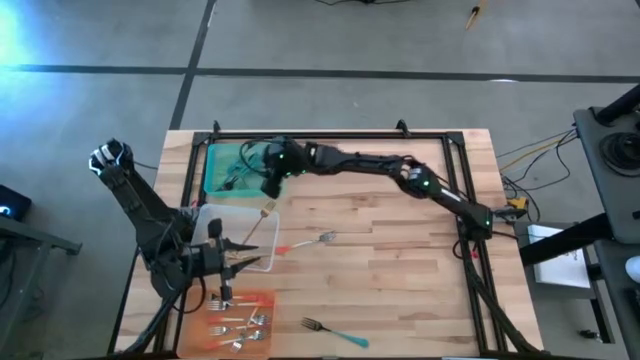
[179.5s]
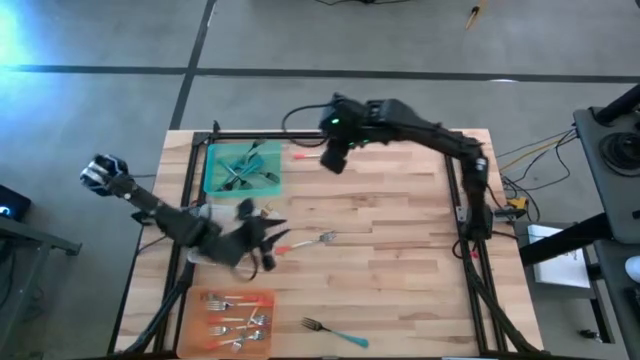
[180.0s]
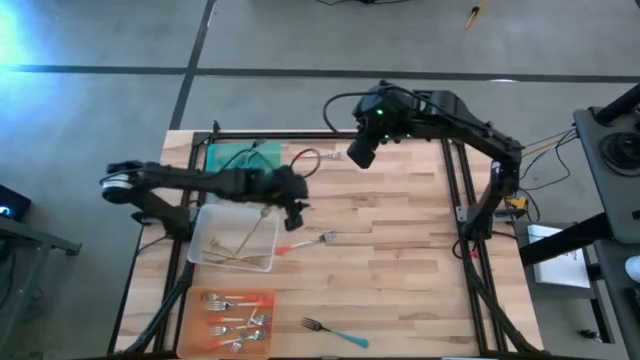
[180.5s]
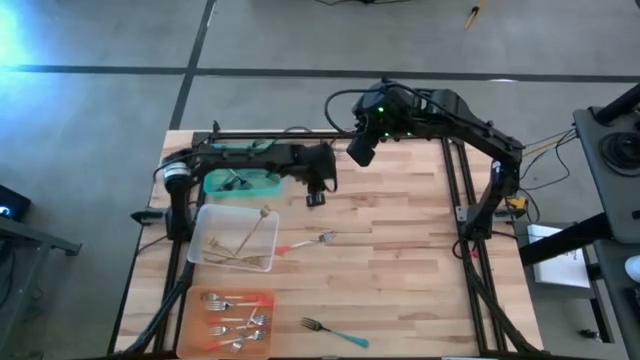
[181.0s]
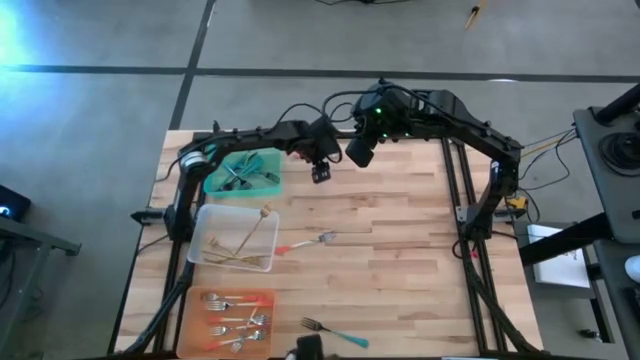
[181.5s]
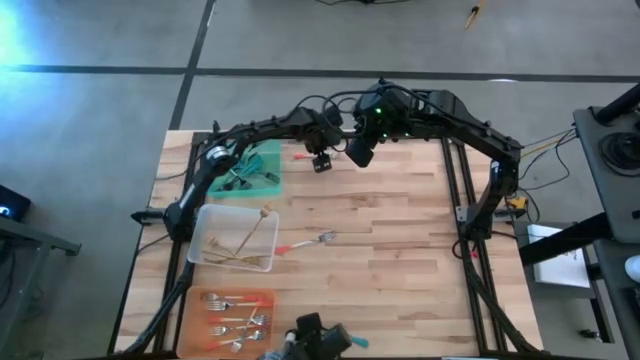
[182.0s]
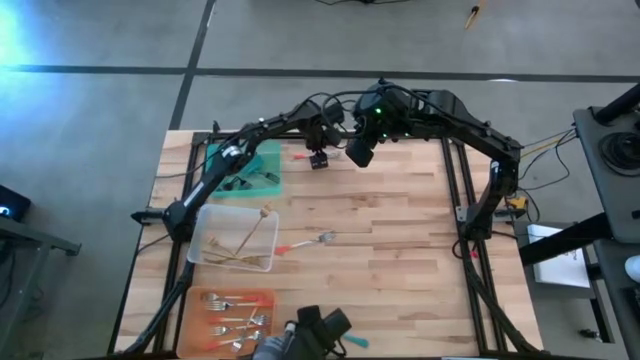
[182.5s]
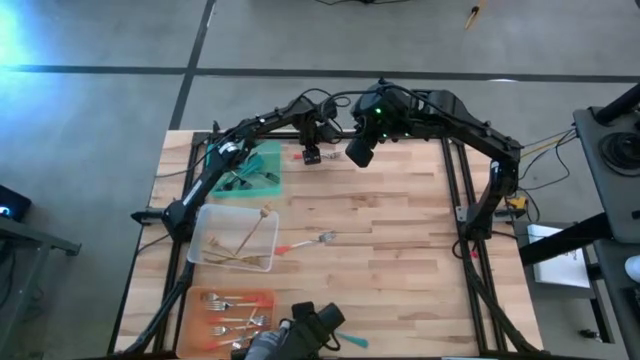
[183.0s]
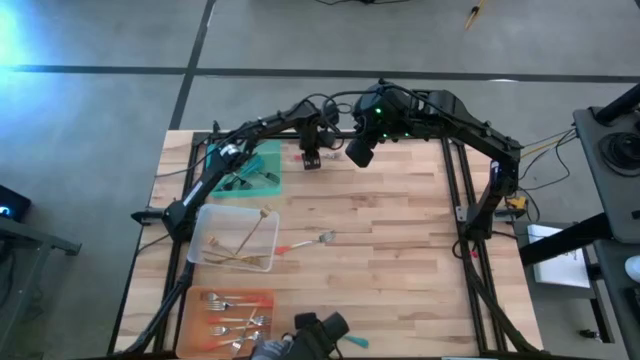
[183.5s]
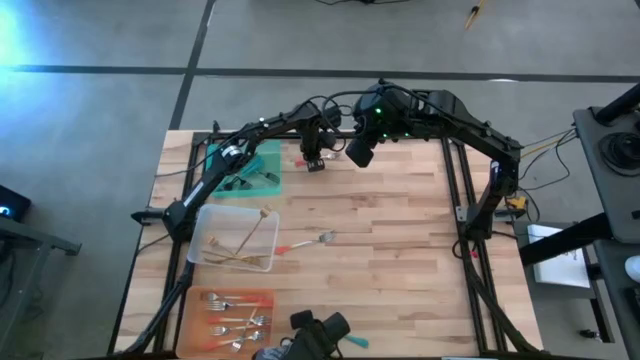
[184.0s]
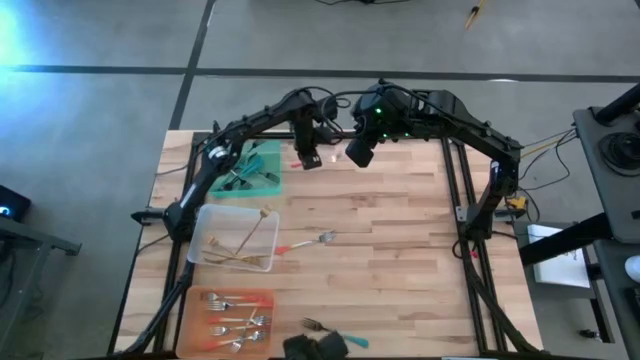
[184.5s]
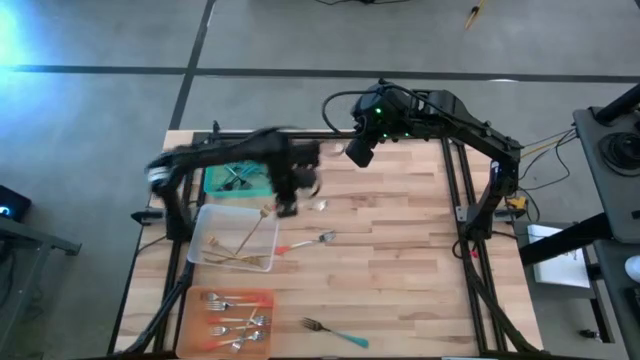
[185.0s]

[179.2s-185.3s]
Task: Sort silverware by color (type)
Put the orange fork into the orange bin

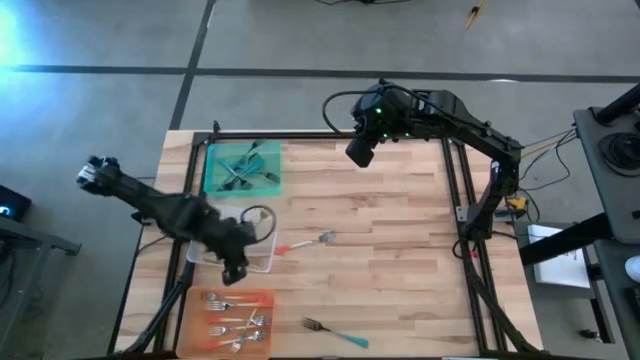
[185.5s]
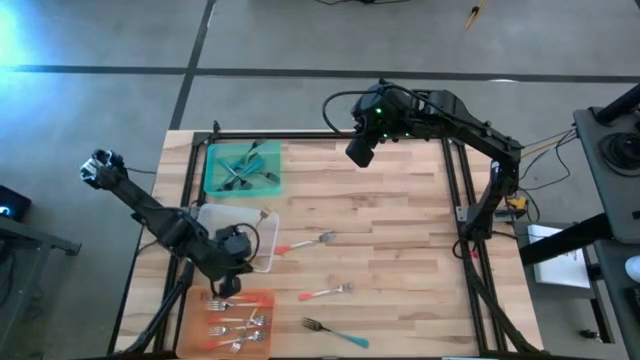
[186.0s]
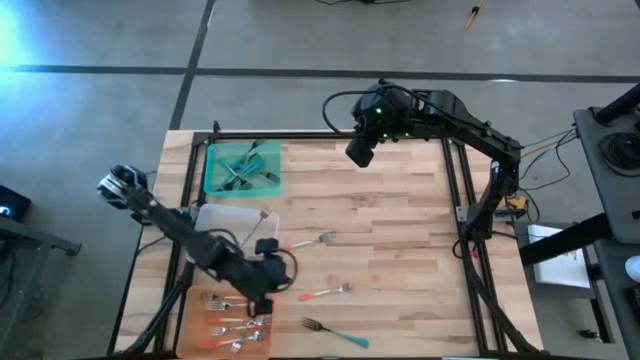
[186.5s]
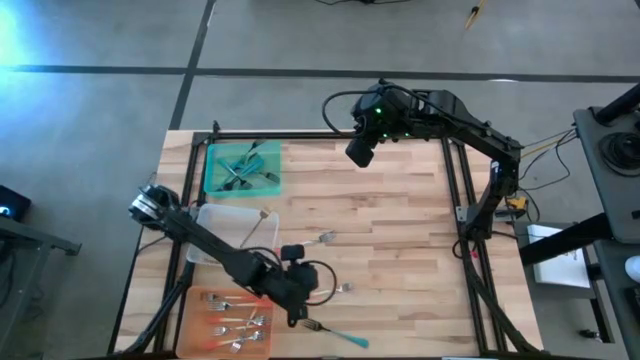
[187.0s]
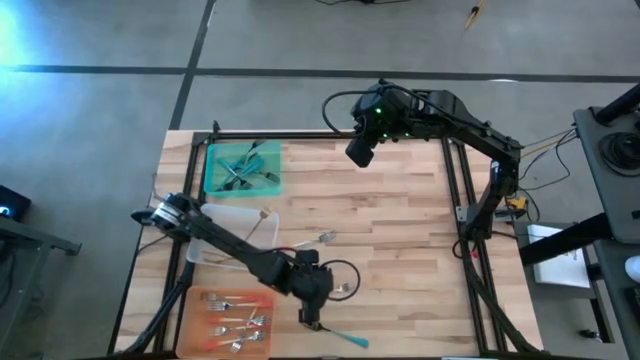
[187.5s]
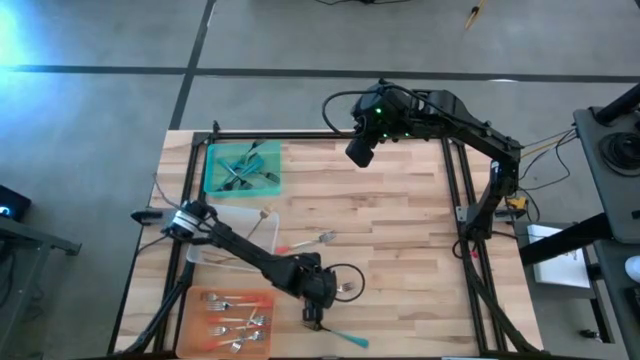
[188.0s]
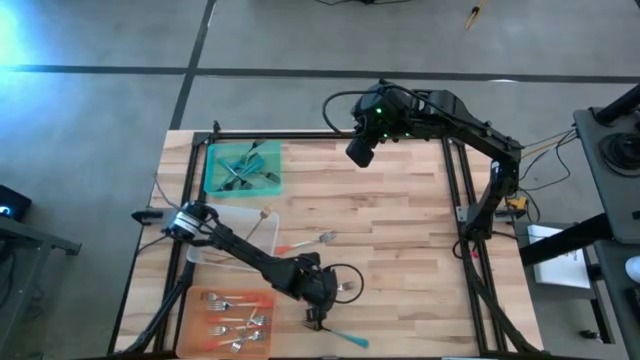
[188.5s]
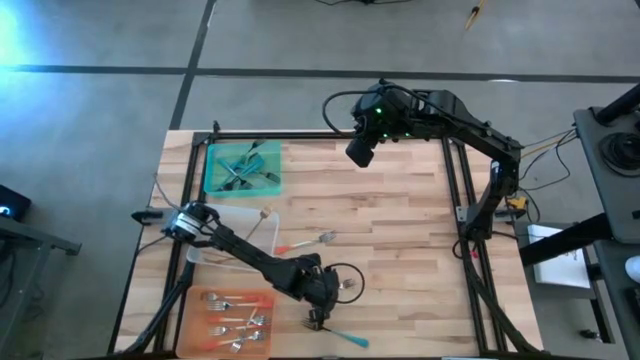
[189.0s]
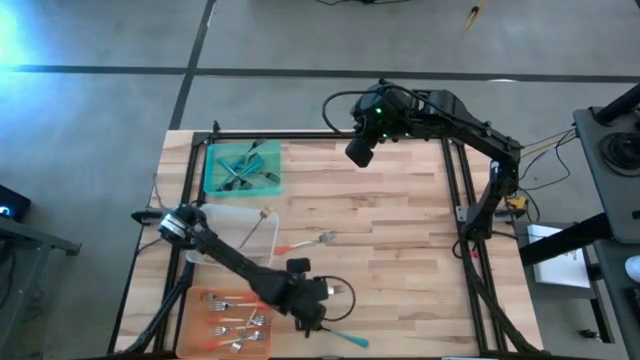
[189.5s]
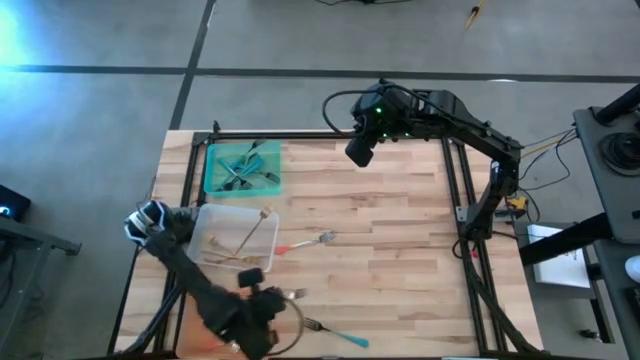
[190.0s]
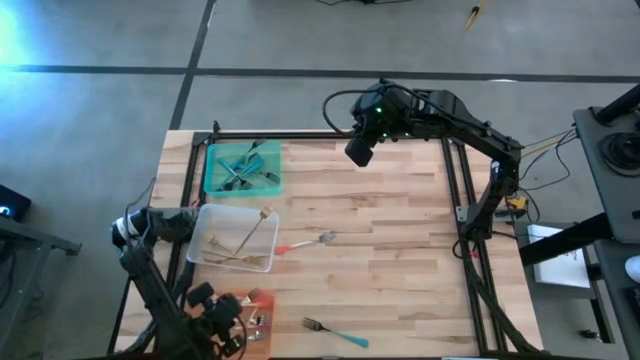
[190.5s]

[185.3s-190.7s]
Put the orange fork into the orange bin

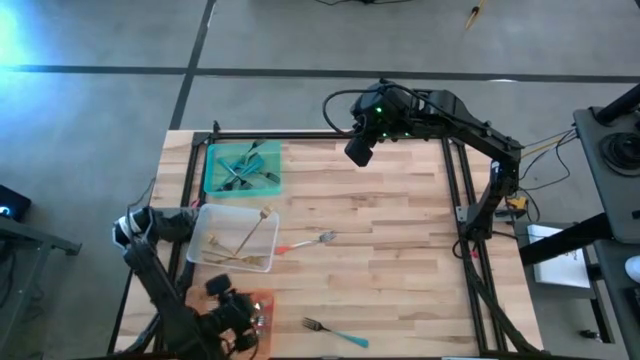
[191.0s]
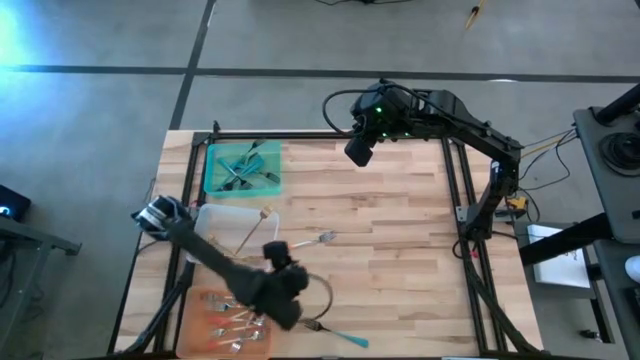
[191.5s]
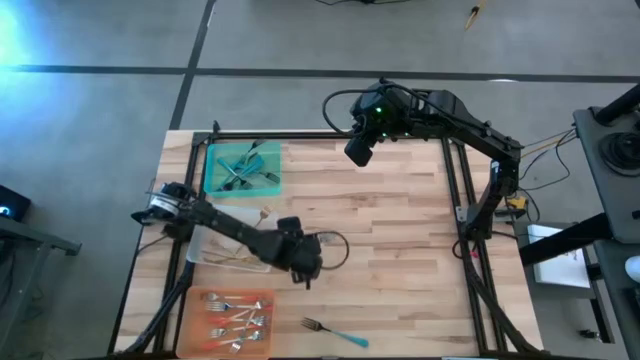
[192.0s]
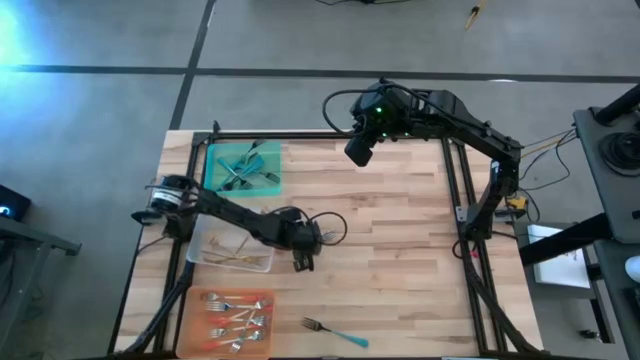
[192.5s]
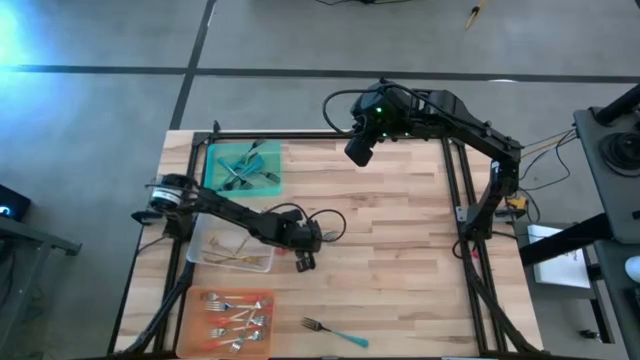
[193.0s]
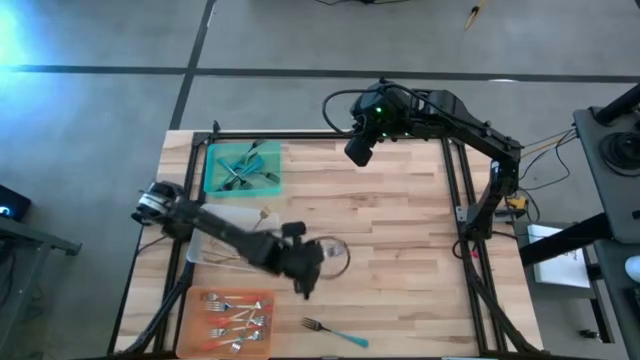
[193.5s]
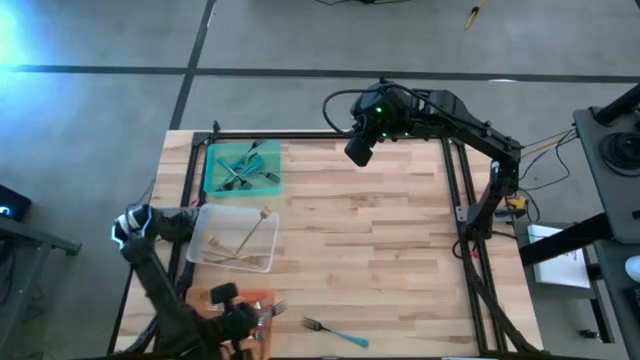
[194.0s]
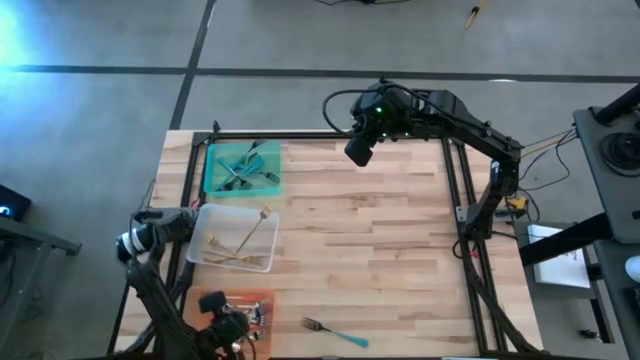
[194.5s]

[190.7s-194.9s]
Put the orange fork into the orange bin

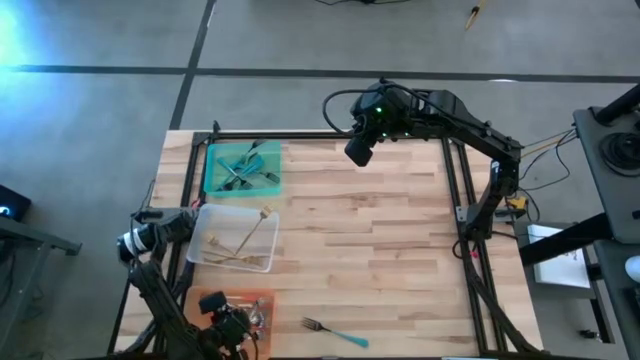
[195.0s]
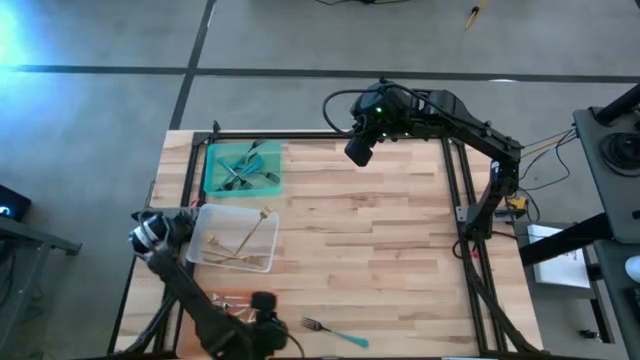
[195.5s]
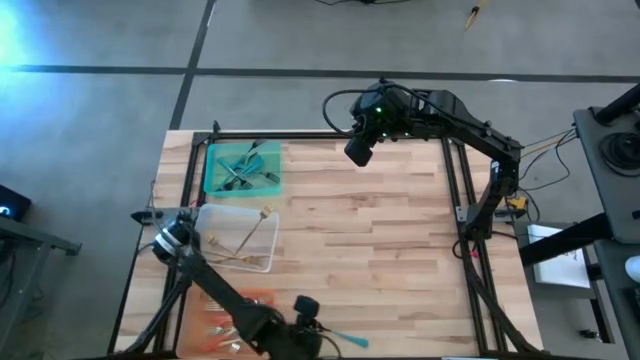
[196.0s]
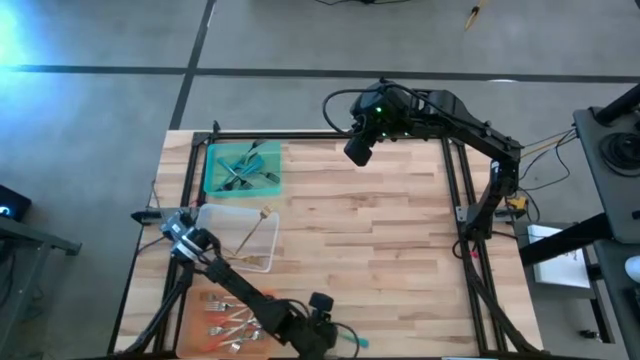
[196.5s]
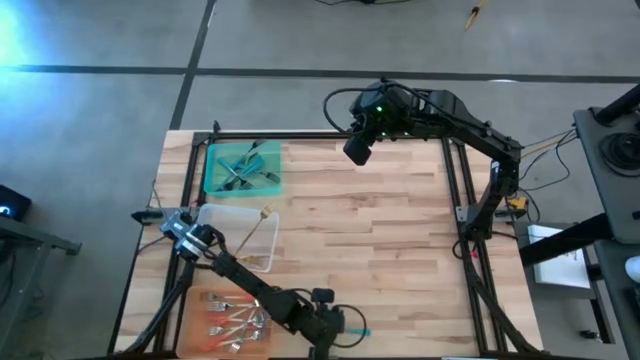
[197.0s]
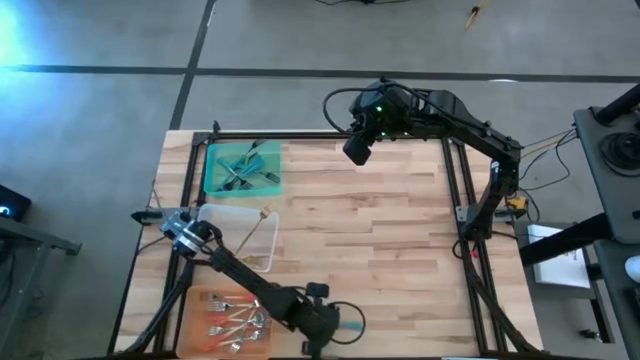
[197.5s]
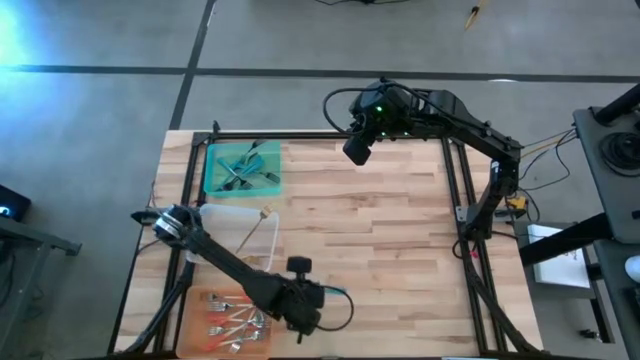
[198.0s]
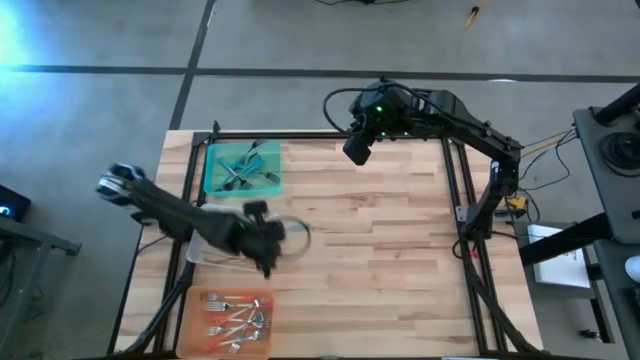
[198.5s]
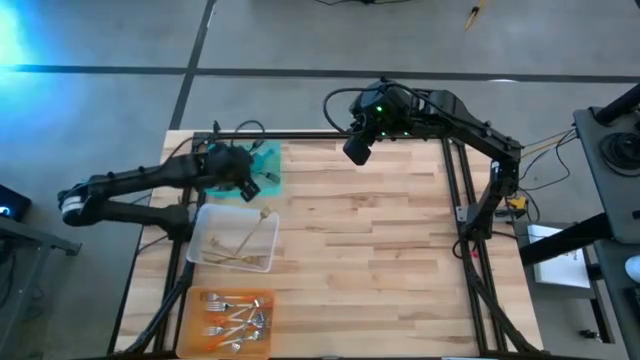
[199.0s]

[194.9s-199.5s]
Put the blue fork into the blue bin

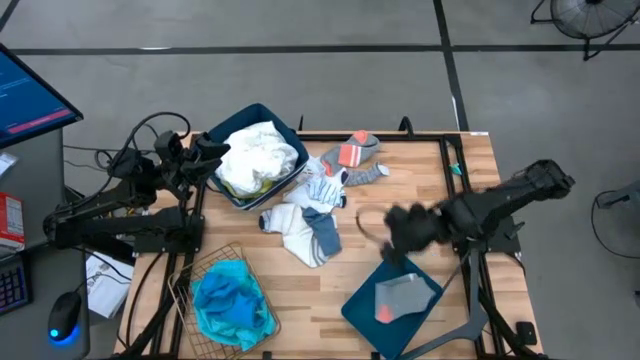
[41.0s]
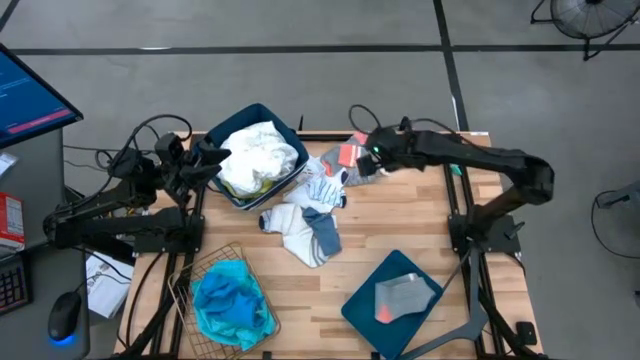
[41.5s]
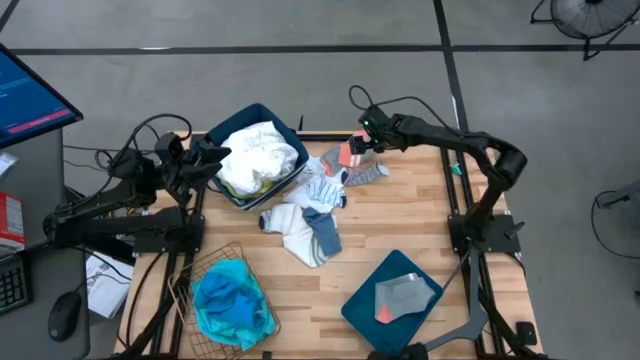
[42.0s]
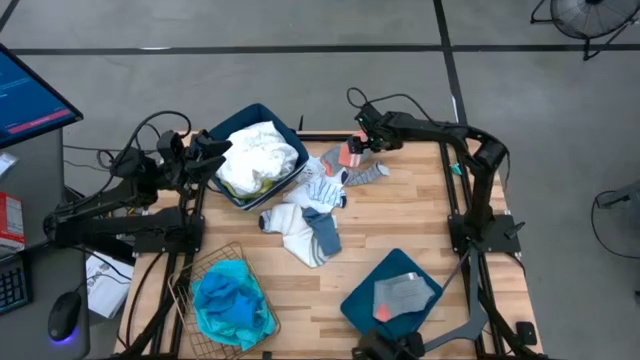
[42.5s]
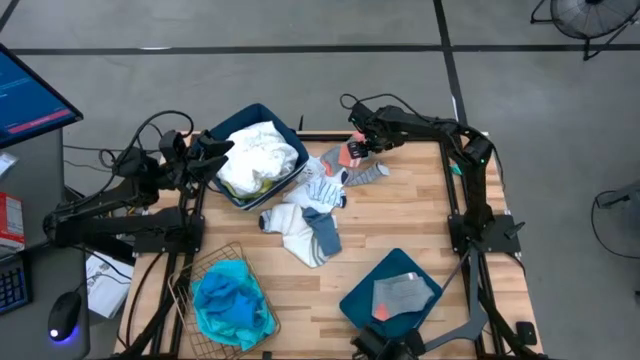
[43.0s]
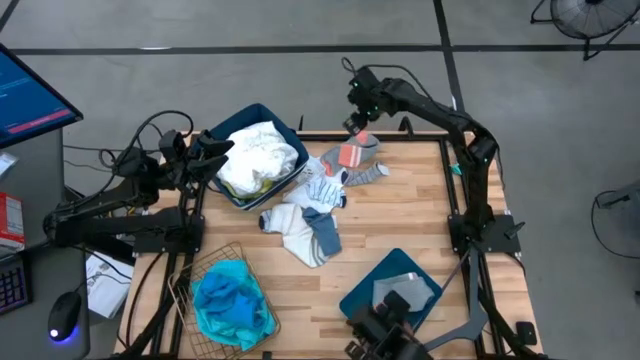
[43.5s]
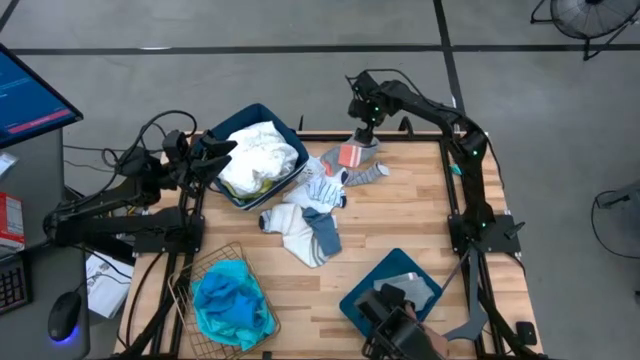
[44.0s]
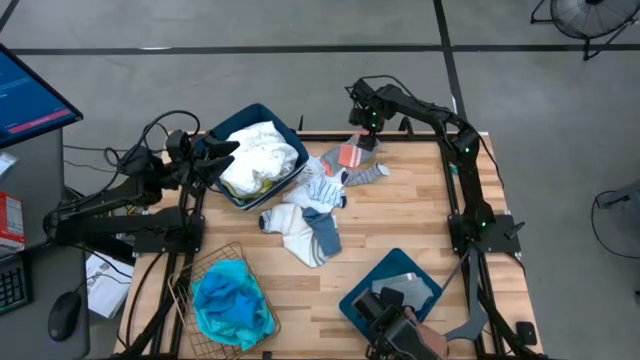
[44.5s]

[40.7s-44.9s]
Task: Pick & Place Cloths
Put the gray sock into the blue bin
